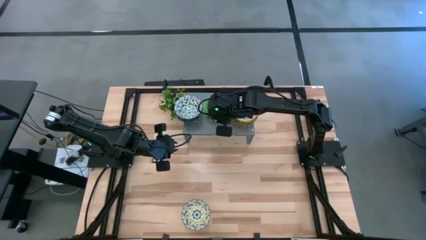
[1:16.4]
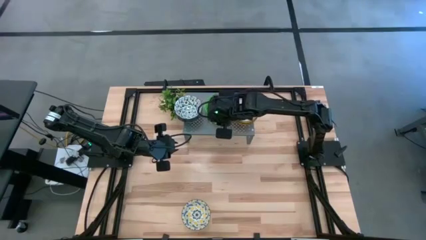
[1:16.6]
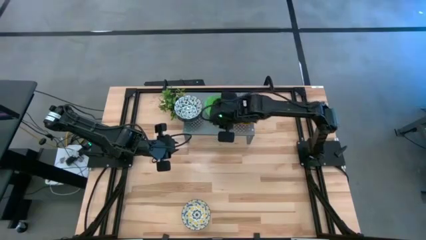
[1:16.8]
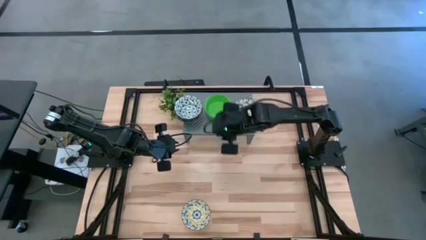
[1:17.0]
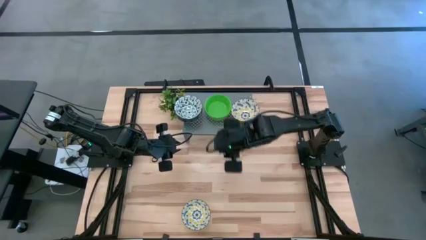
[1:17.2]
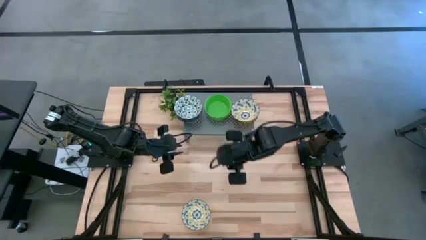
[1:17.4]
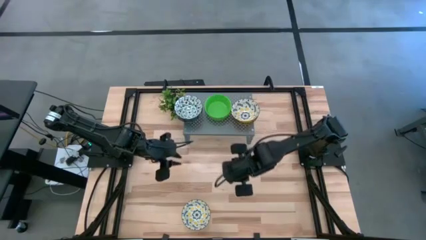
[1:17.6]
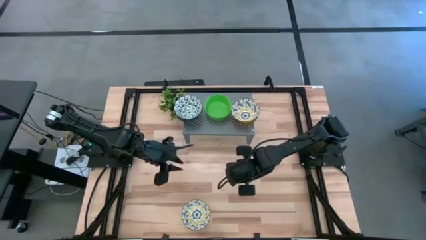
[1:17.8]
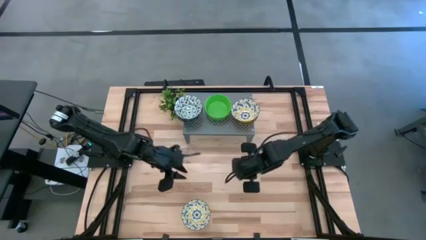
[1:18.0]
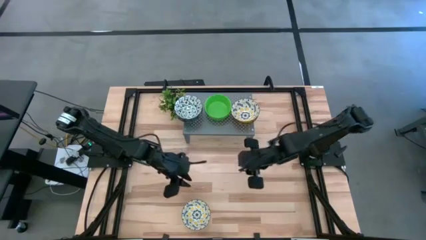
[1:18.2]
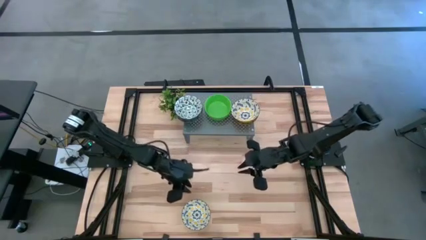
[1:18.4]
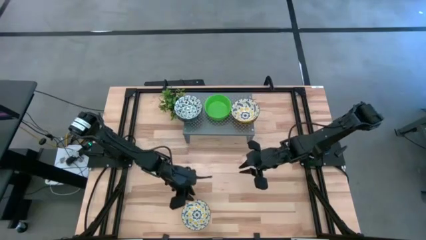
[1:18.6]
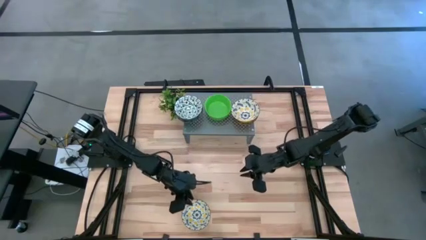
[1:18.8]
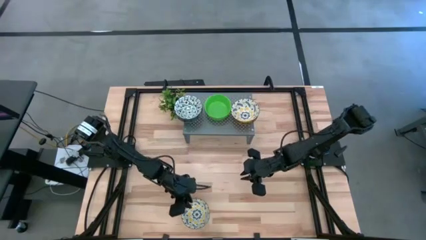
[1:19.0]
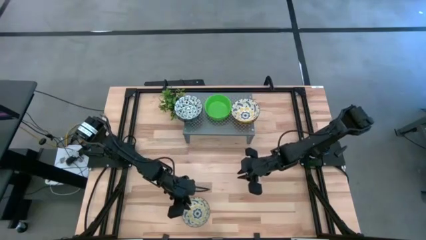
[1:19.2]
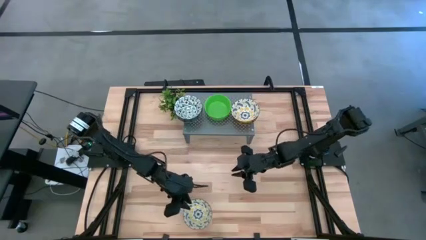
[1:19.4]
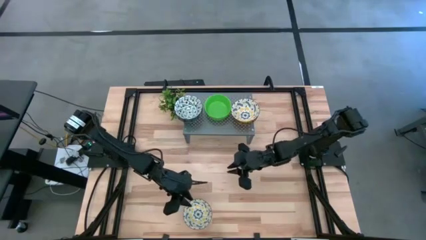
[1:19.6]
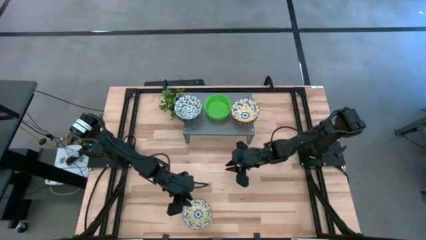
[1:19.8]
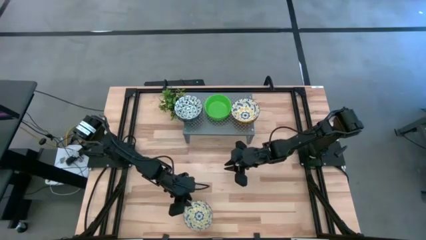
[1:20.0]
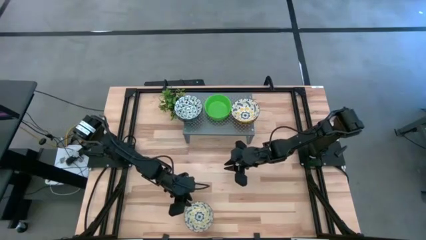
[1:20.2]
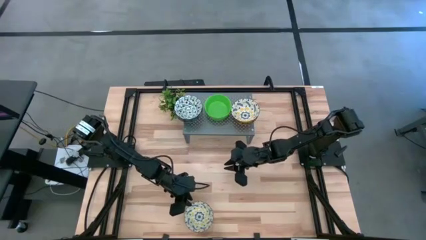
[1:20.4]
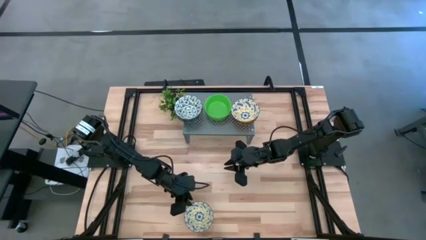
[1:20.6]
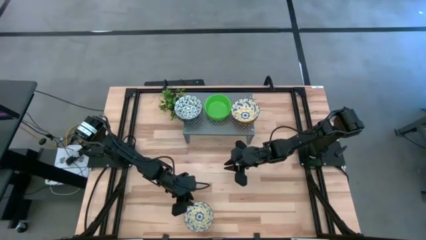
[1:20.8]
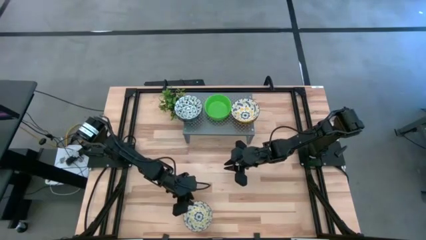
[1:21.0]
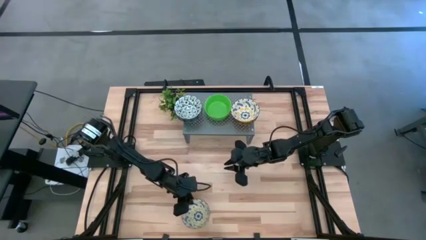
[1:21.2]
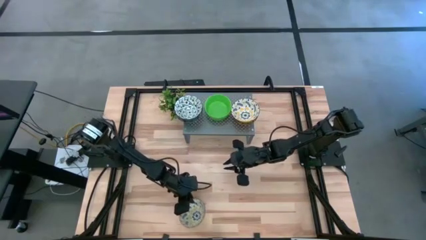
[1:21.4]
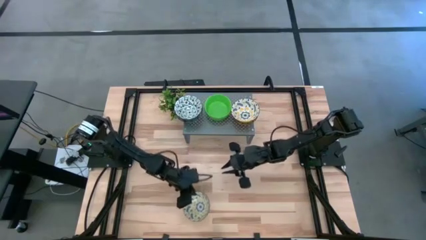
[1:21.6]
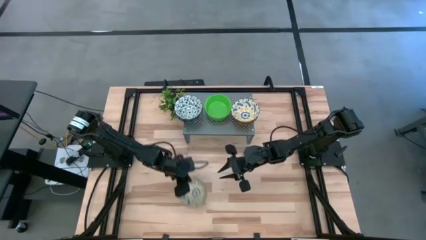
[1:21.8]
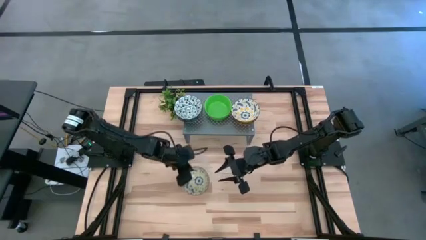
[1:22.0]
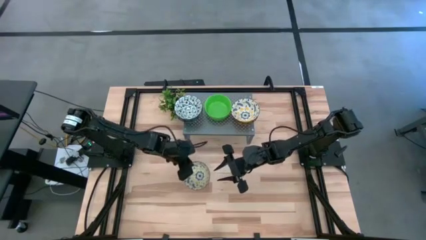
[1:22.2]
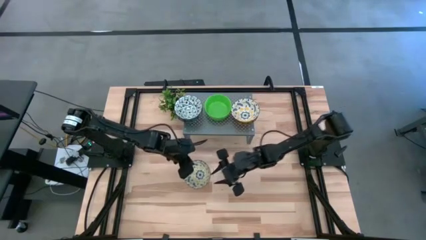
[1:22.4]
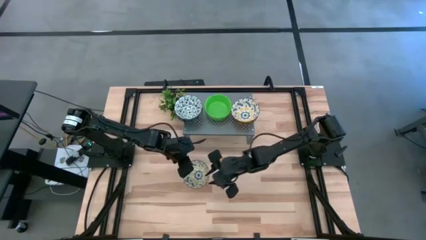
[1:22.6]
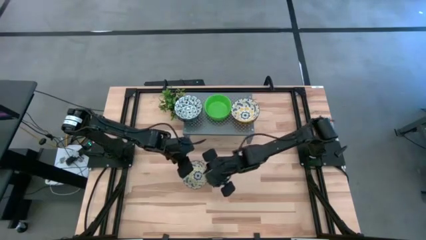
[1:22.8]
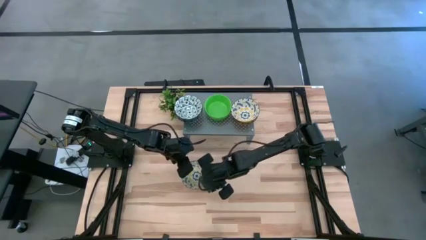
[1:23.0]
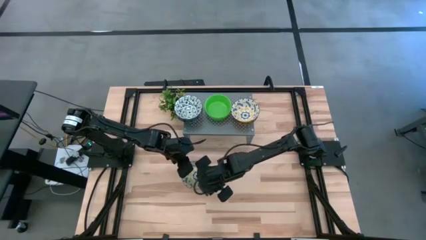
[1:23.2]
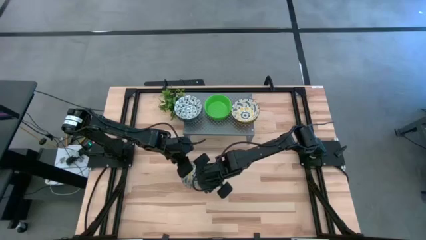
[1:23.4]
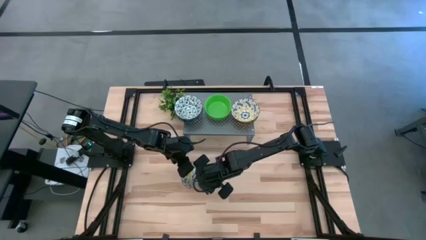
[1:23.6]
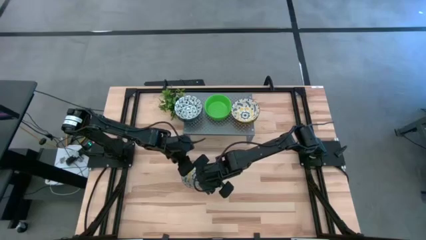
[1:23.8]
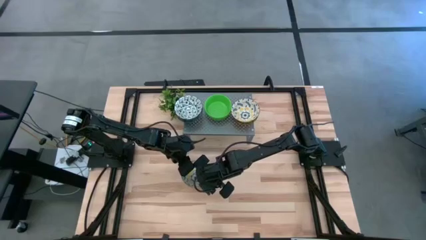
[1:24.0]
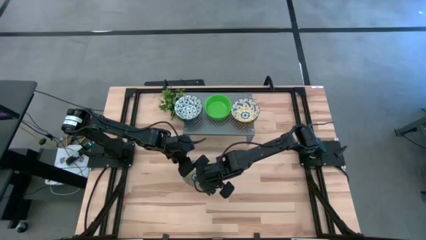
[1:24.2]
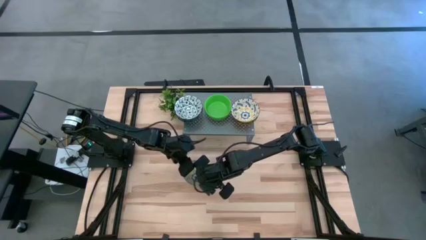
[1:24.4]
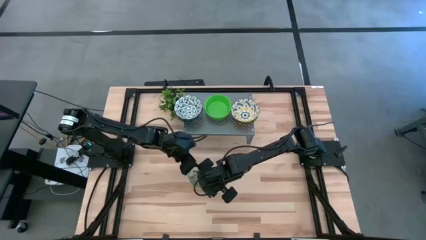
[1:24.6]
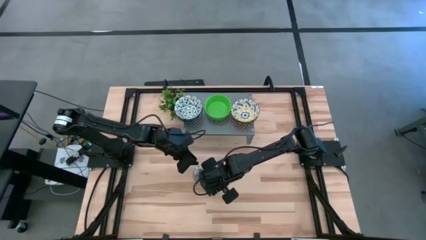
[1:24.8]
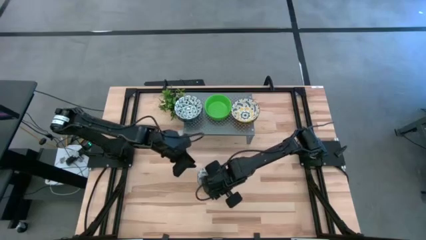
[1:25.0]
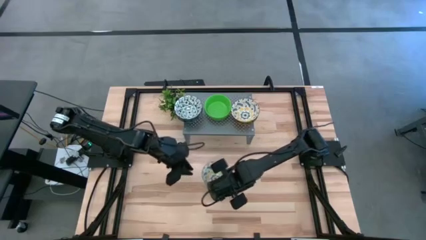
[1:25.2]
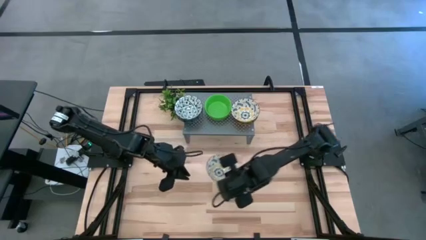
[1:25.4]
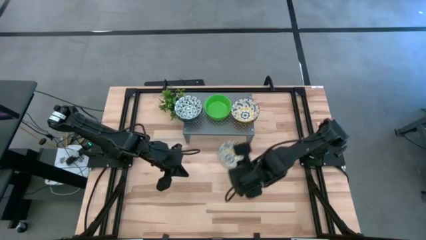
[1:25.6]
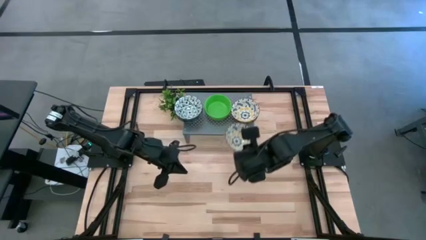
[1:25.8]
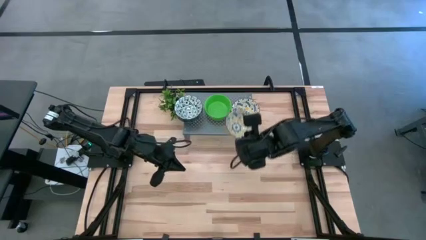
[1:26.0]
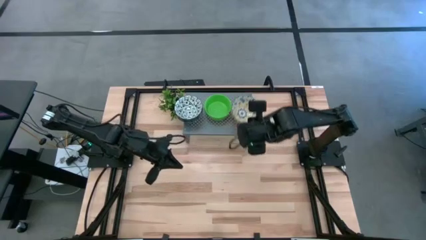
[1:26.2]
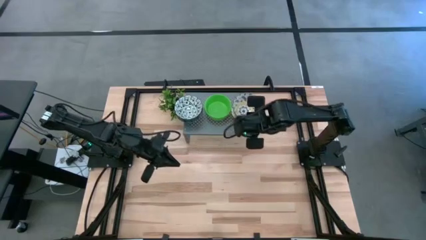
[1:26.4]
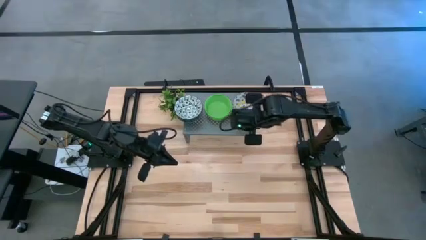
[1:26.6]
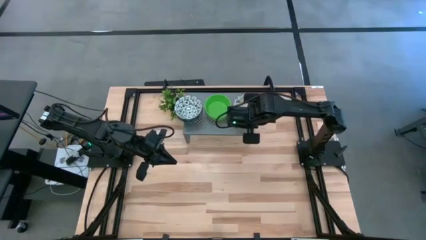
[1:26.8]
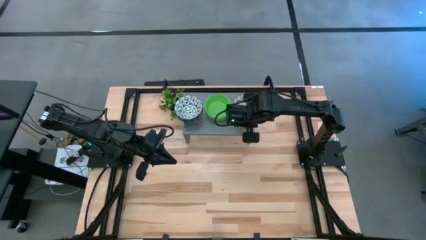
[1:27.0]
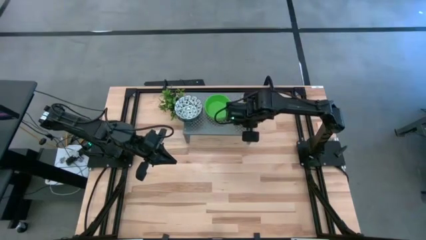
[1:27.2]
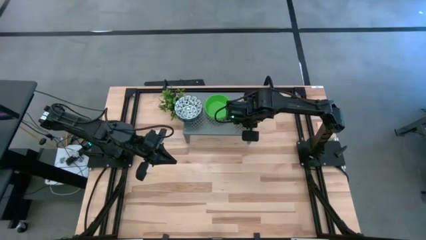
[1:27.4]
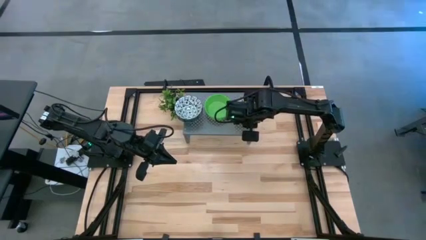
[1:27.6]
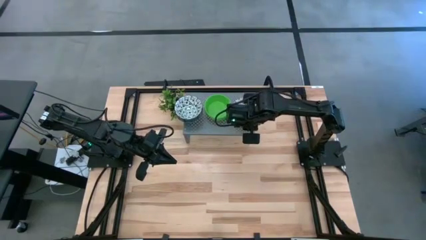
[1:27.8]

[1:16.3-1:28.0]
Task: Pick & Place Mini bowls
Stack the yellow and white patterned bowl on the other yellow and white patterned bowls on the shelf

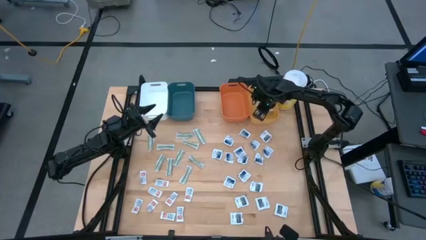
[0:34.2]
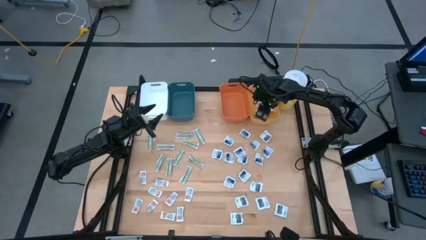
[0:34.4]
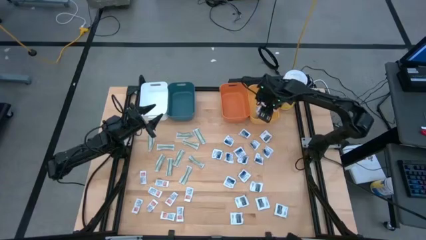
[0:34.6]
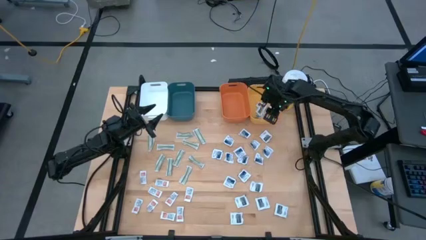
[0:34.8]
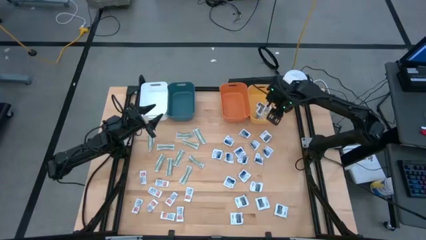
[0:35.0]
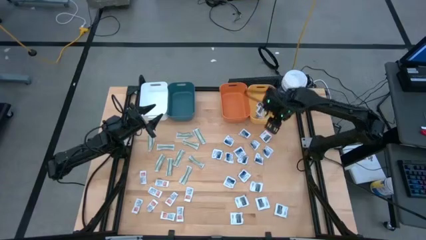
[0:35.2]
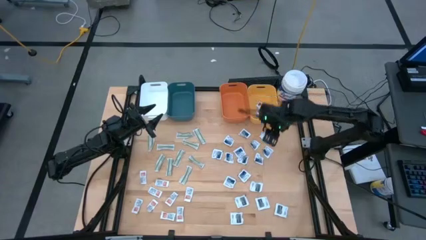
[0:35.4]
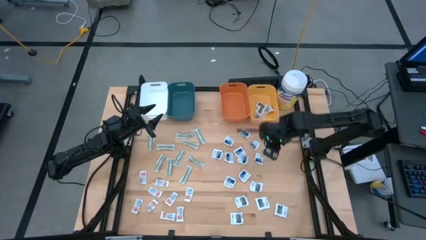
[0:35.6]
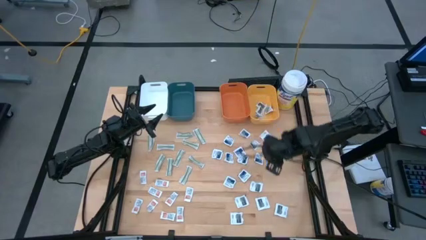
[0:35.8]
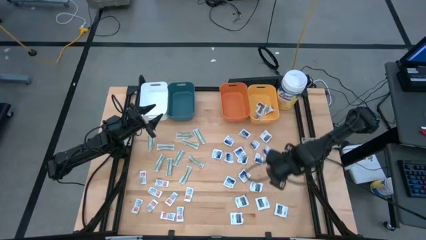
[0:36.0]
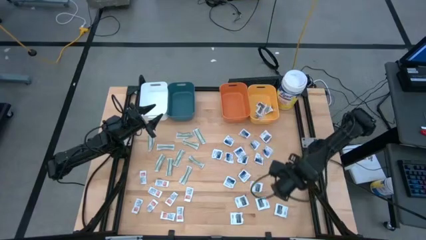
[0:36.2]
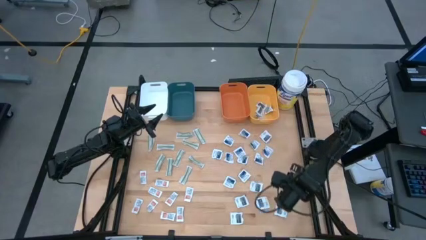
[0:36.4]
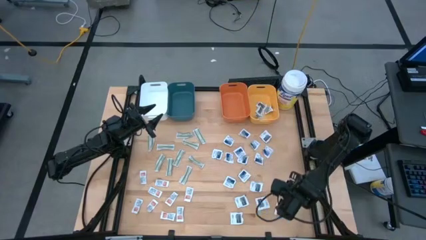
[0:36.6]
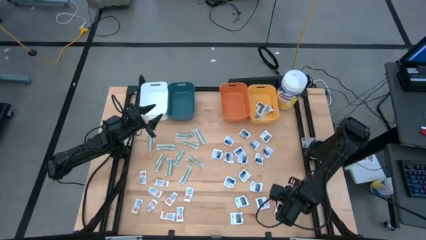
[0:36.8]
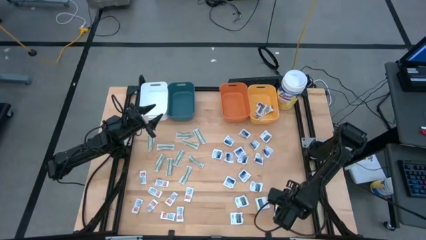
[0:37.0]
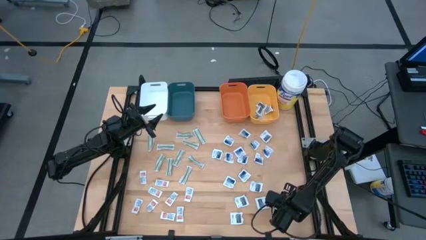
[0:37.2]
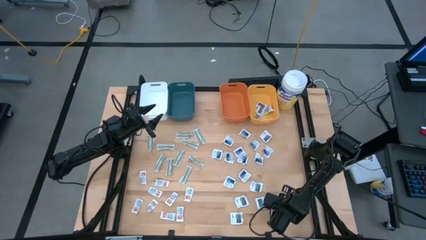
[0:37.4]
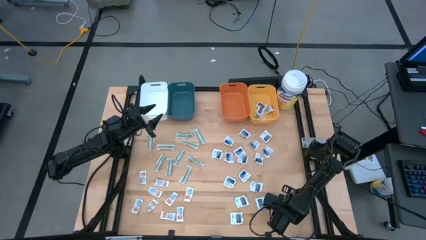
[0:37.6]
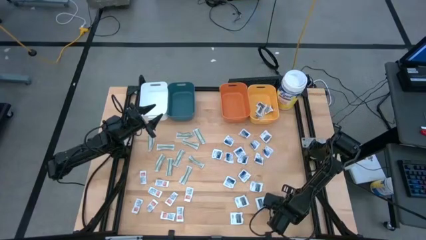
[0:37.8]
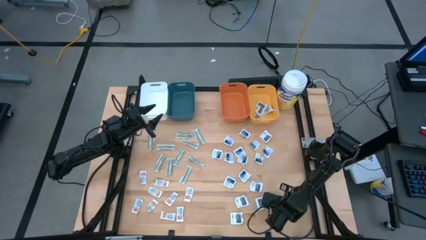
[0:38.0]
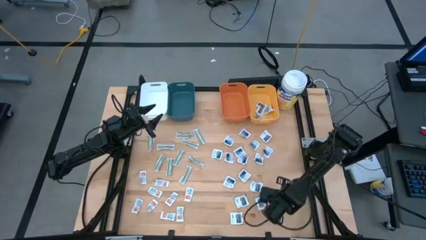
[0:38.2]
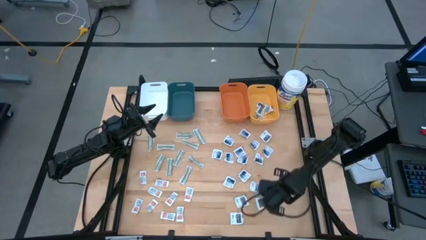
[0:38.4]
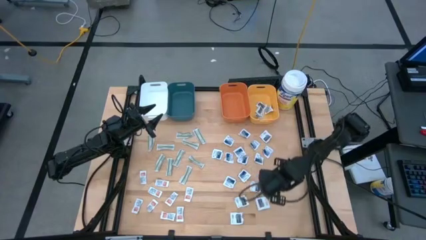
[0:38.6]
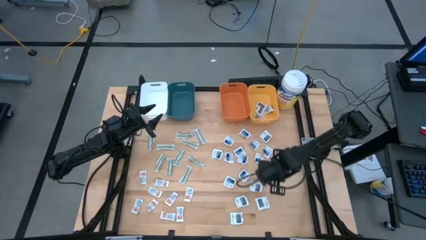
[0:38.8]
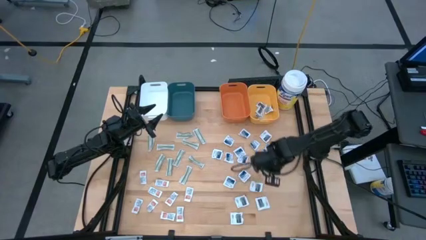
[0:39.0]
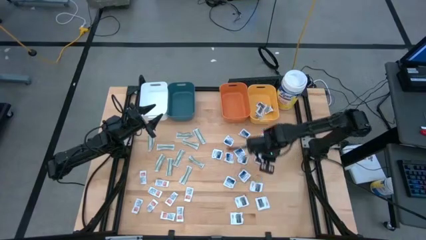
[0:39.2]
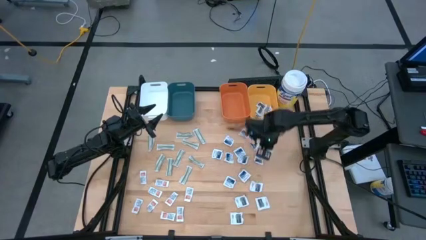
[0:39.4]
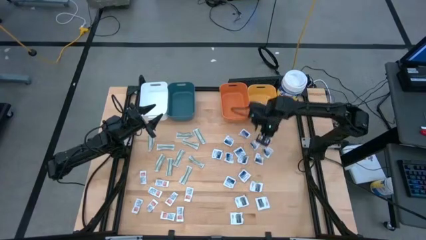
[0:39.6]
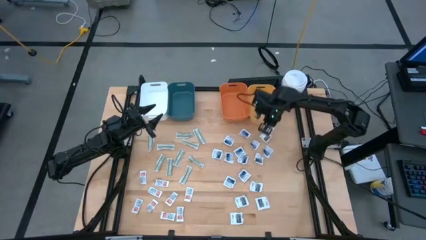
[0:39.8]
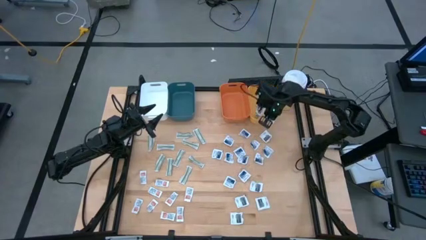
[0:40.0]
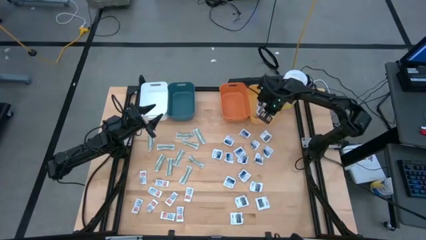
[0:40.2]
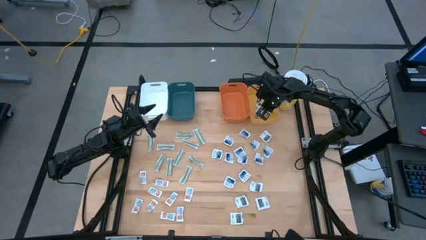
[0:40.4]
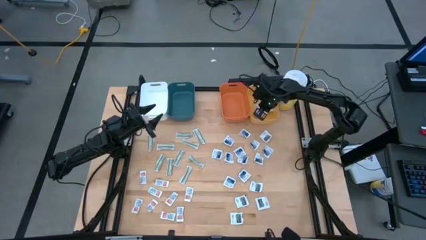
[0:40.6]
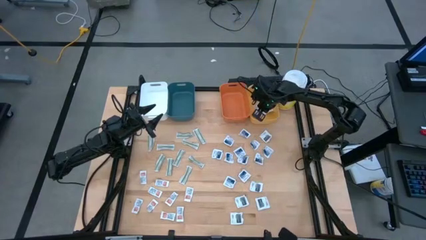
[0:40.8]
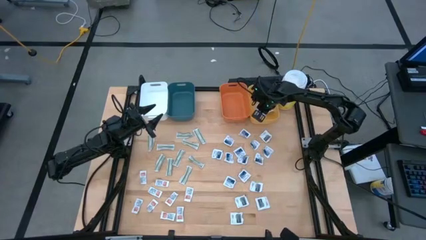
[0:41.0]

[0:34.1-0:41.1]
Task: Pick & Place First Aid Supplies
Put the towelette pack into the yellow bin
